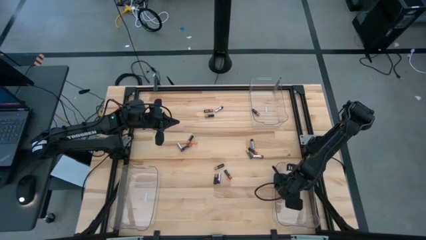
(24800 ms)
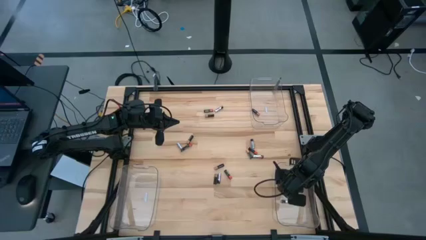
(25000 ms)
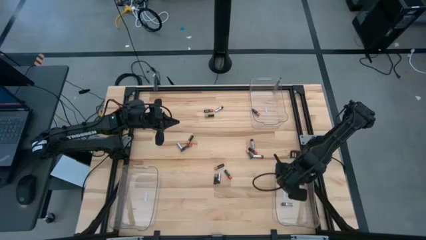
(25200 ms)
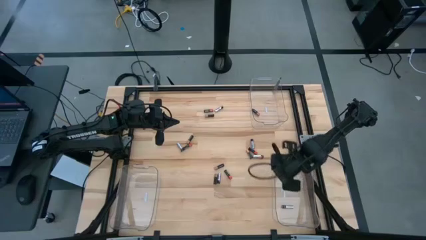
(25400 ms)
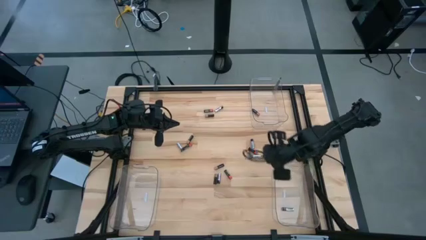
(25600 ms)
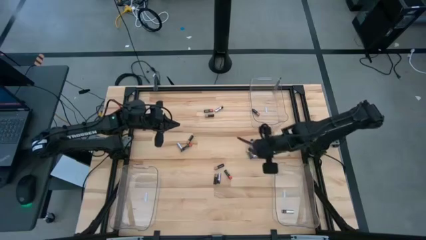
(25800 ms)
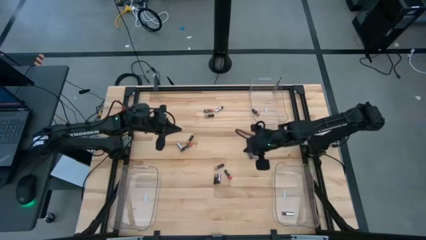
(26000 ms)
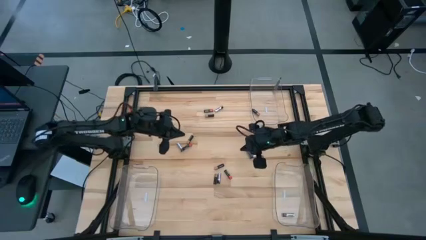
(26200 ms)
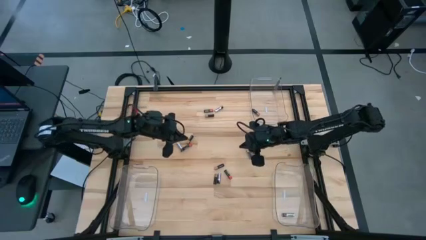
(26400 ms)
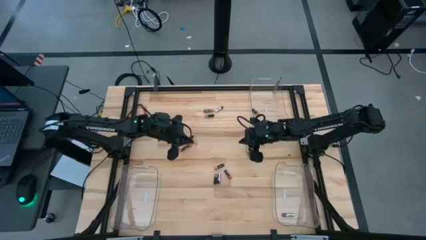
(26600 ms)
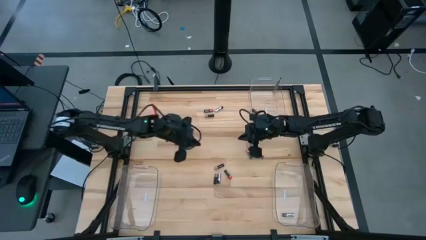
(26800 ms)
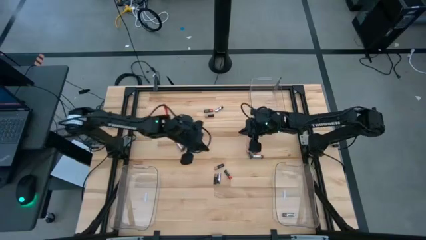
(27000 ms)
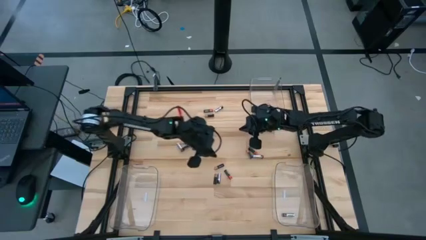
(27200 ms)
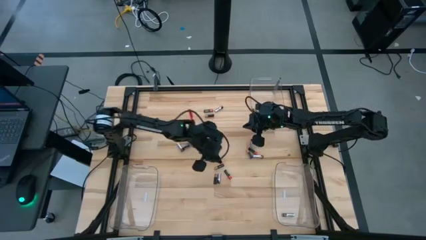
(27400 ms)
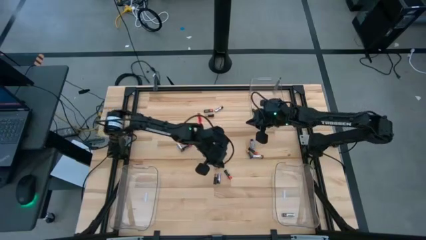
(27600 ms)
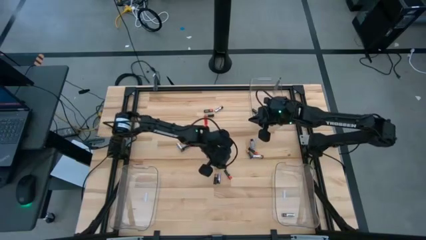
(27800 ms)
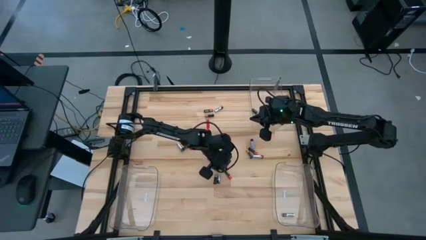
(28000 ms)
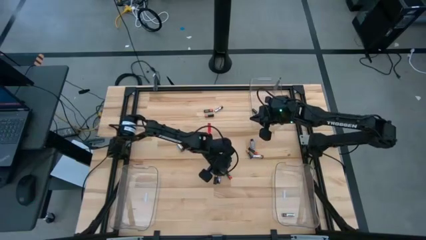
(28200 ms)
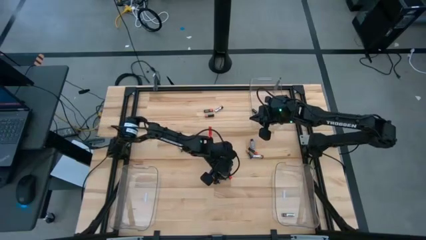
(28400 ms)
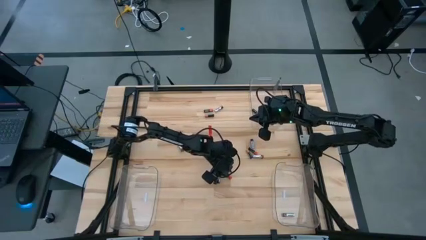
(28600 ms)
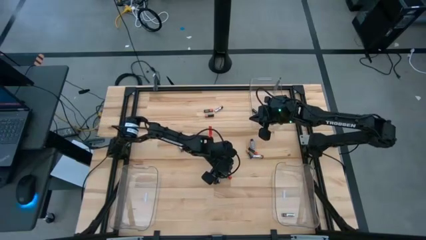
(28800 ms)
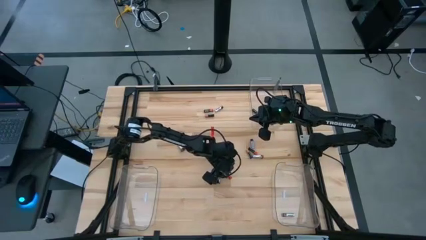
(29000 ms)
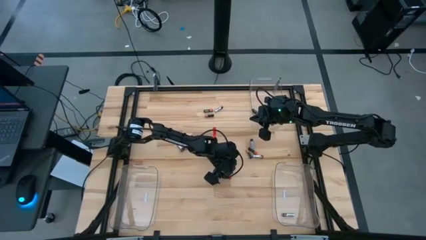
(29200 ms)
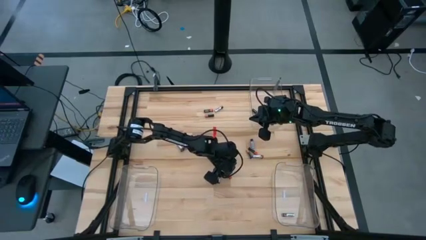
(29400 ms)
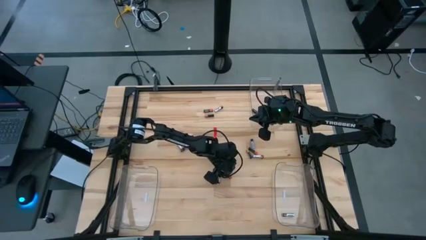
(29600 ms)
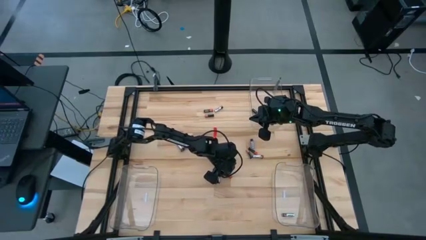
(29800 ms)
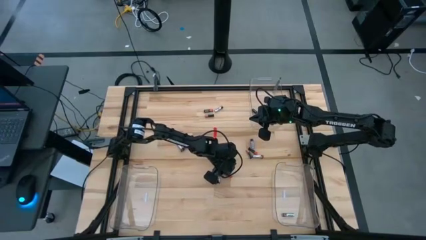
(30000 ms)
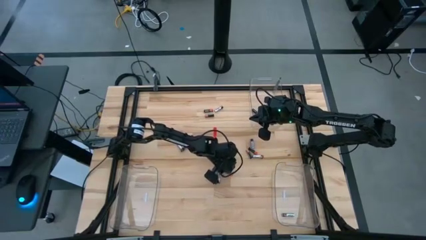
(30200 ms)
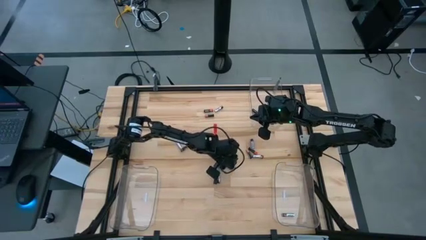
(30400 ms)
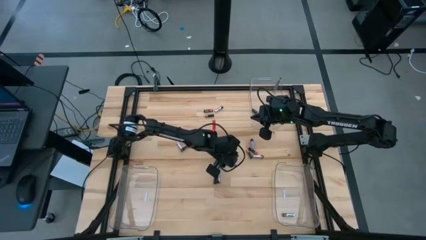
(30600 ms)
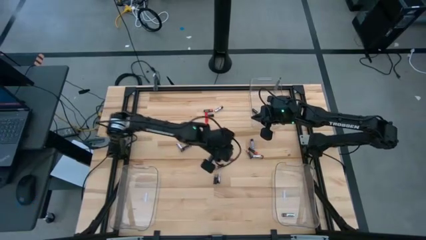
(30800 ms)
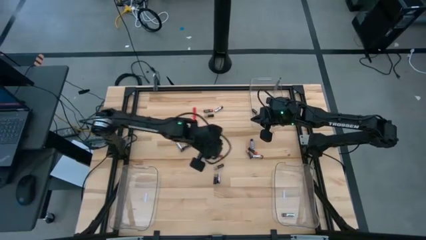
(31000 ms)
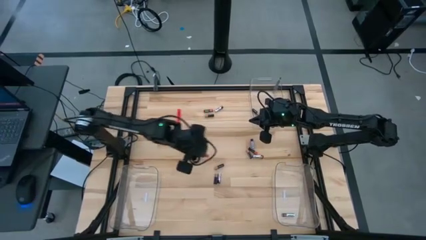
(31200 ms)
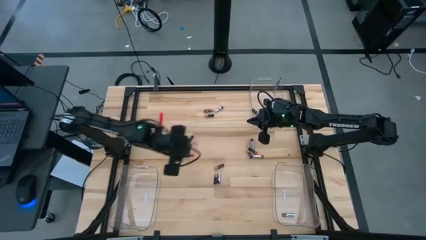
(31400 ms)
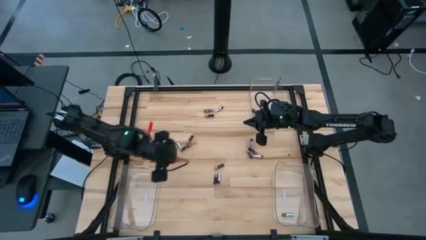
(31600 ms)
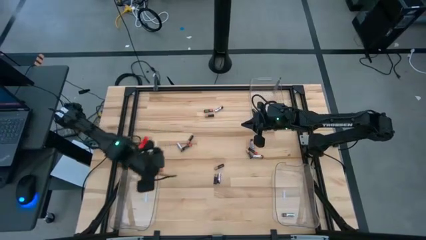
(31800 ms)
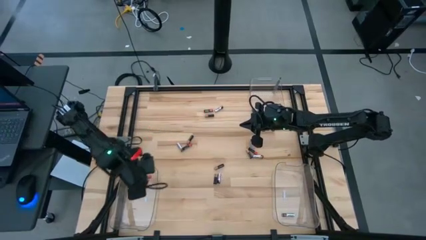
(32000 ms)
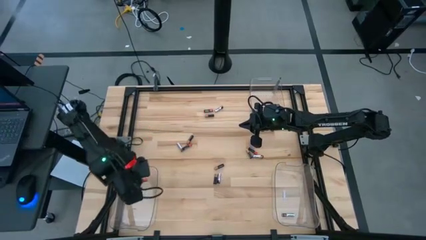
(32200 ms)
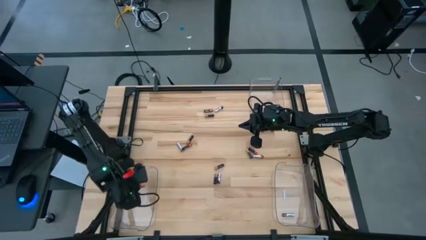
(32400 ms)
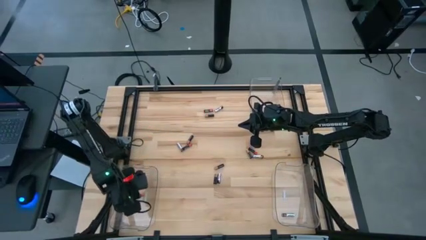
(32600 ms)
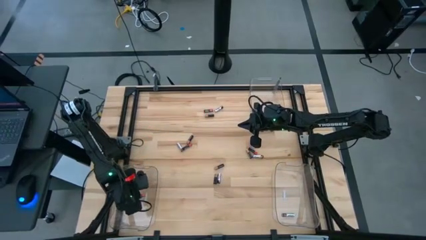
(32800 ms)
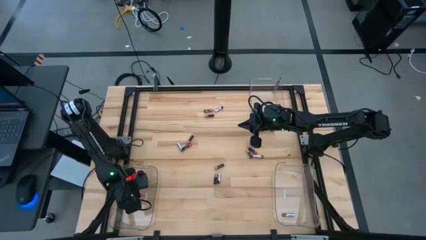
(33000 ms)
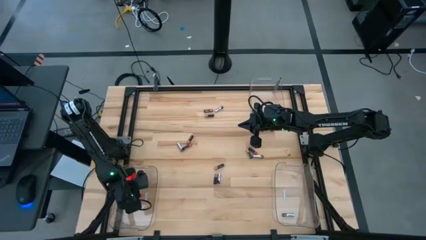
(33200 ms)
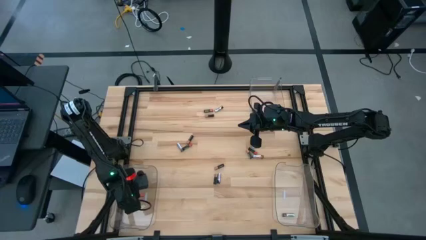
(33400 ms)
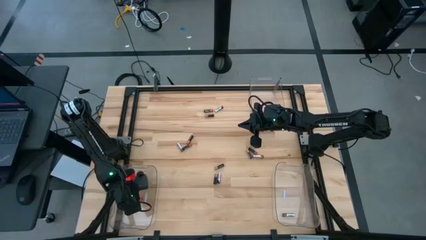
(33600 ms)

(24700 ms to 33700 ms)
Task: Sort batteries
Put the orange battery into the bottom left transparent bin

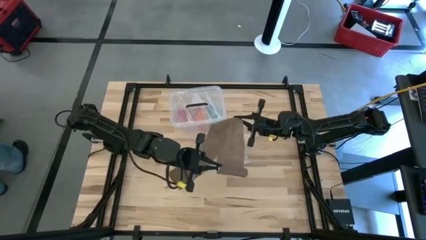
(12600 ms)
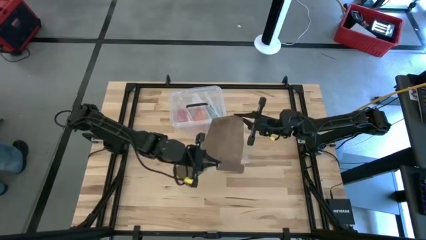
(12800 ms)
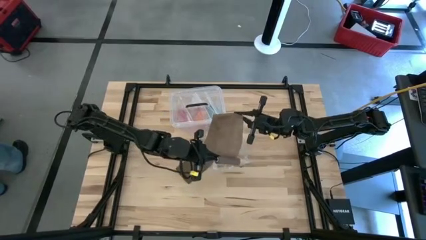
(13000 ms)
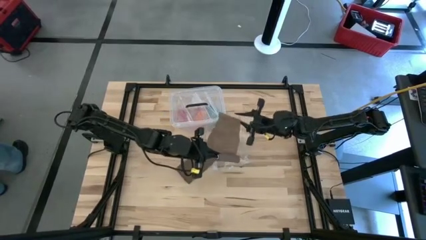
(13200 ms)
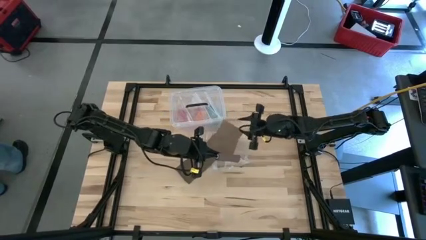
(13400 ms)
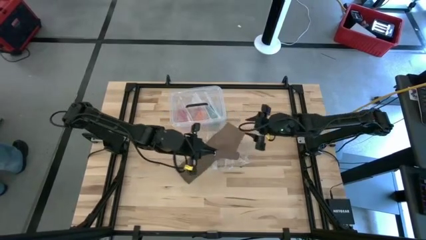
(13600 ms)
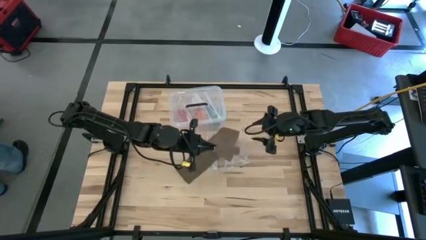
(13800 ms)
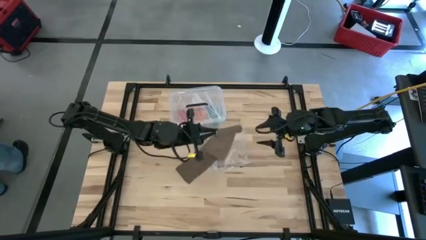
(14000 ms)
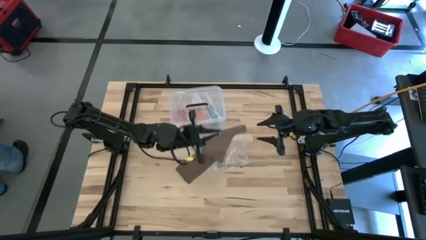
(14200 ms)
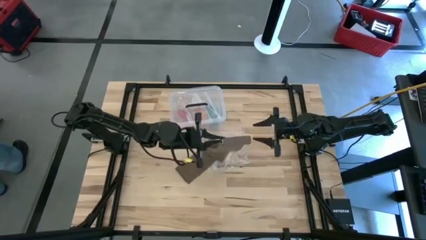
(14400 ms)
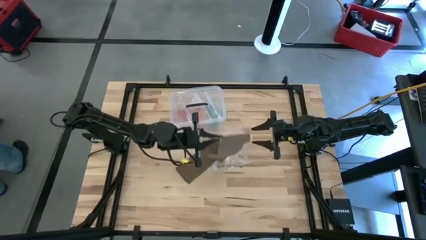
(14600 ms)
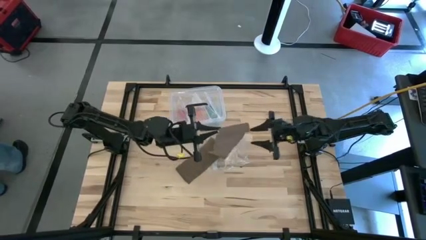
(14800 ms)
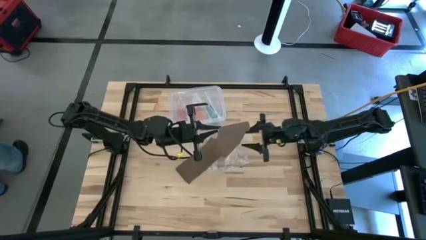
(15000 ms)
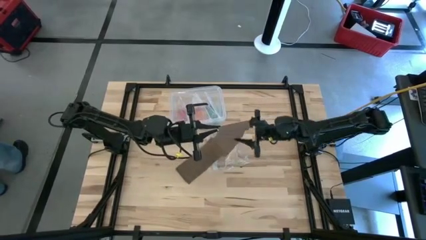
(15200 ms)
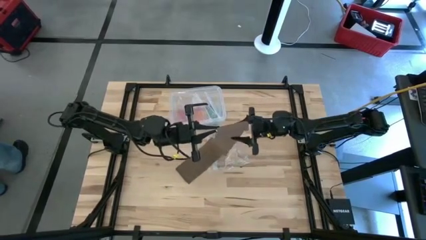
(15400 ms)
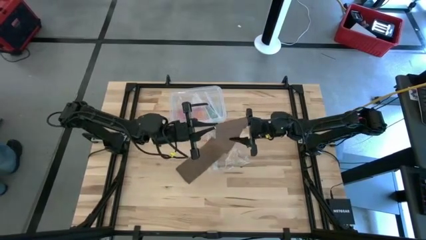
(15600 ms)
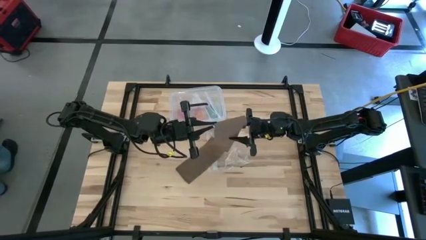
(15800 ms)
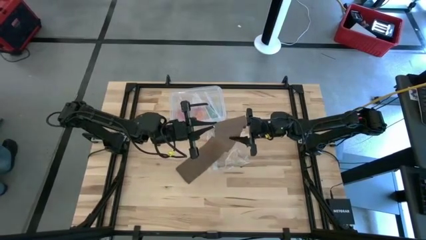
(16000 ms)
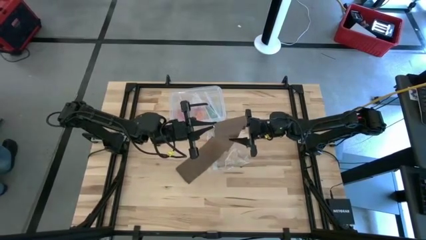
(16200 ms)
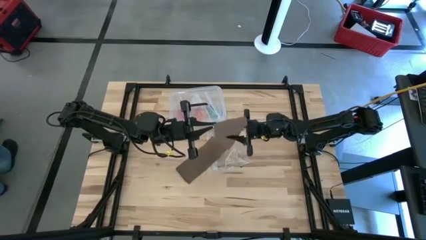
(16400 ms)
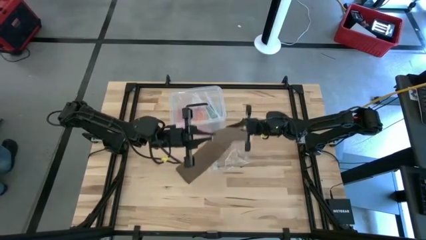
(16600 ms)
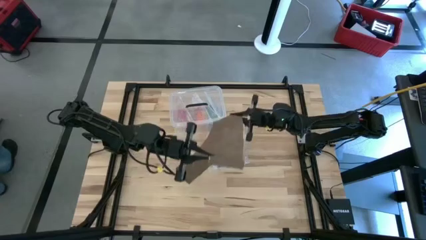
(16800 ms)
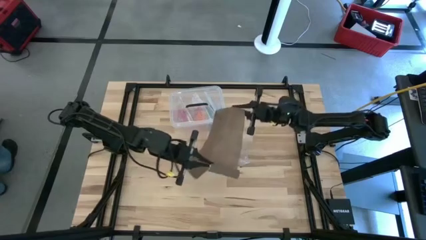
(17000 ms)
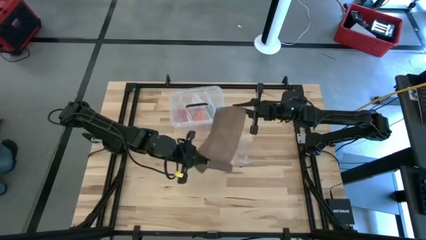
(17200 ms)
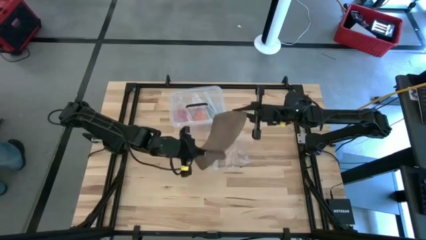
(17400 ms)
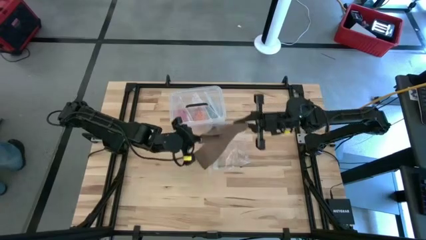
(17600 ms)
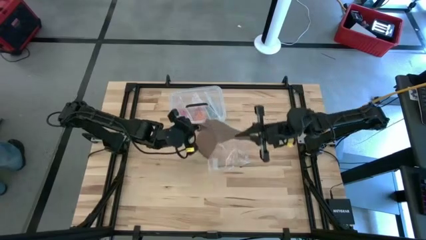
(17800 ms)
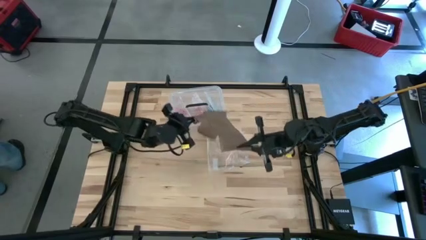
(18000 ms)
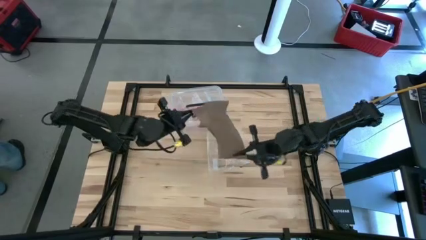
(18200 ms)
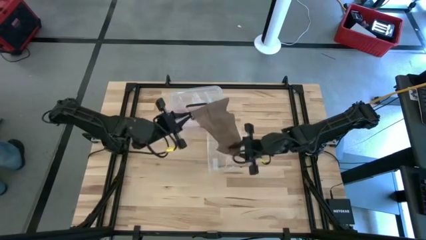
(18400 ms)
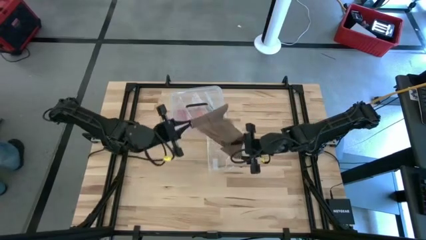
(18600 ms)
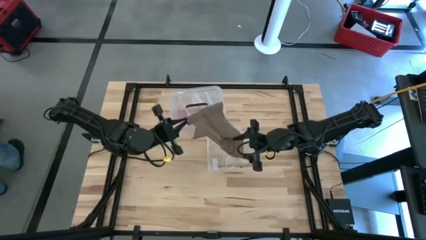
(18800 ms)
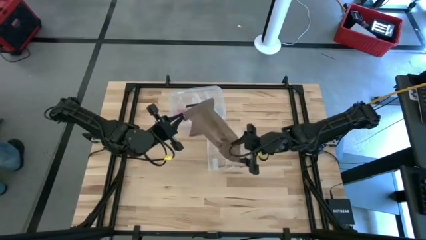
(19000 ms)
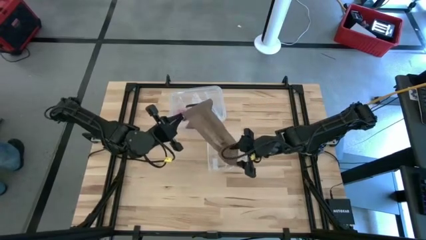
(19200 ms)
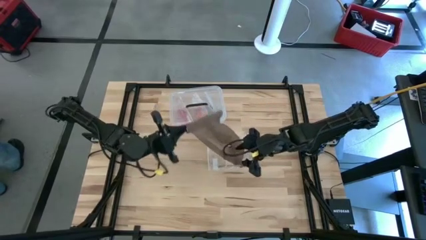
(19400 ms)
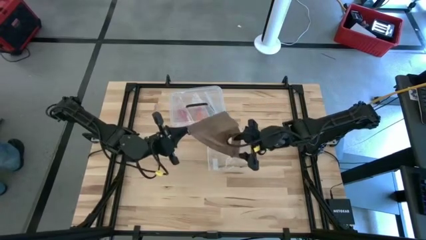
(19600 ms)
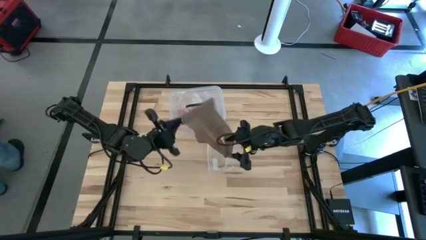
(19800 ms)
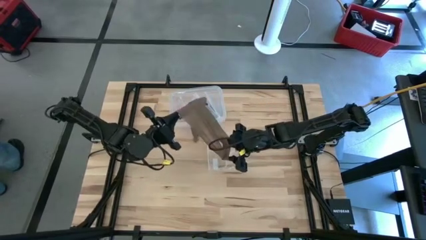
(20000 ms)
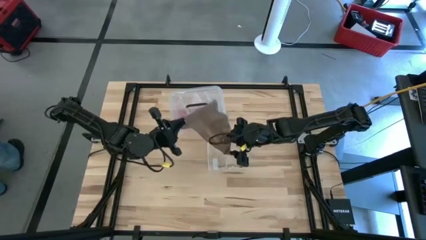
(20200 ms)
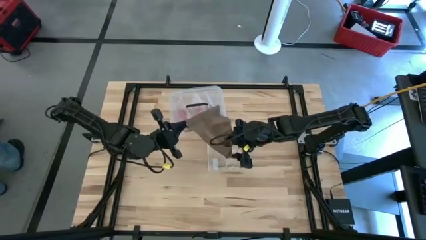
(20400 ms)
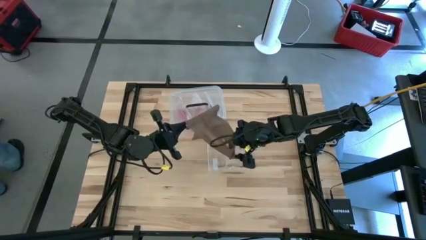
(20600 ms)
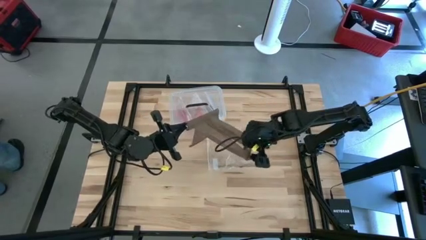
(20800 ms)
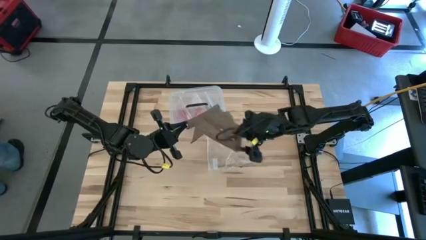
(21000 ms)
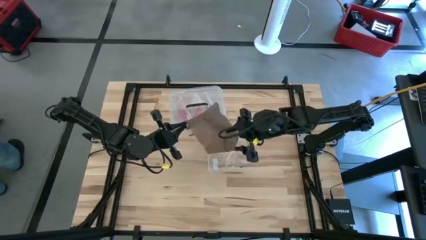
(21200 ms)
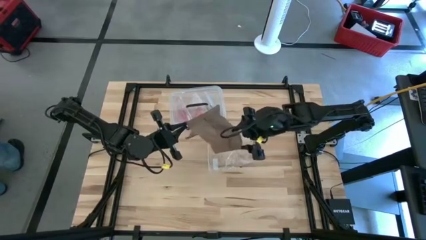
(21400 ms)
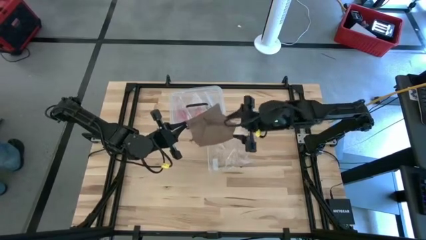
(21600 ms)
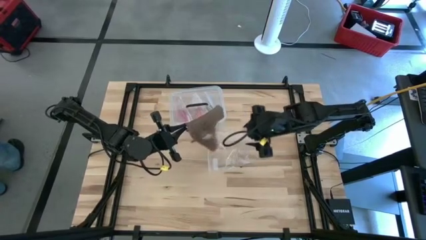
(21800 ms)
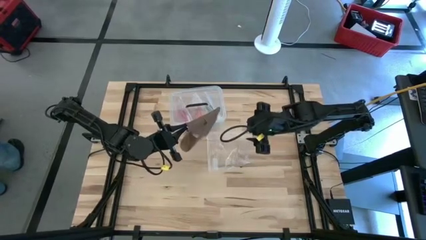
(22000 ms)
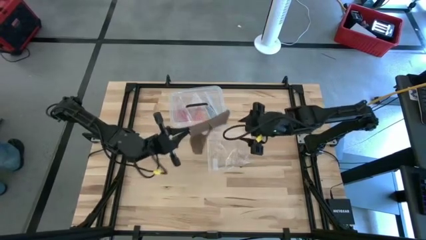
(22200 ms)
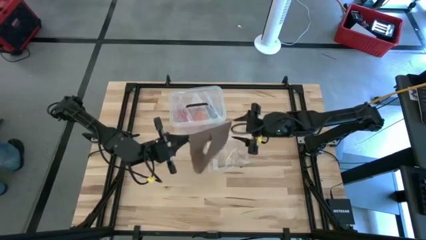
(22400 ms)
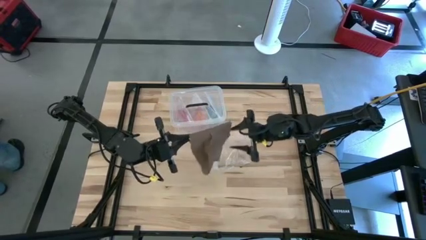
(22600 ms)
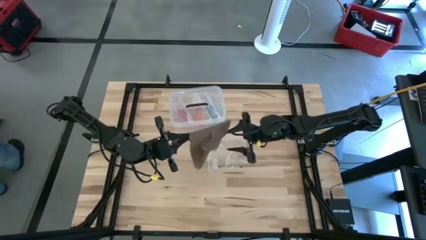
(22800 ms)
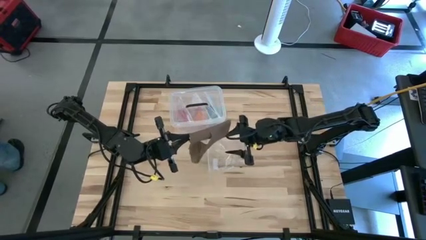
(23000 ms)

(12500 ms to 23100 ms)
Task: Roll bandage
Roll the brown bandage
